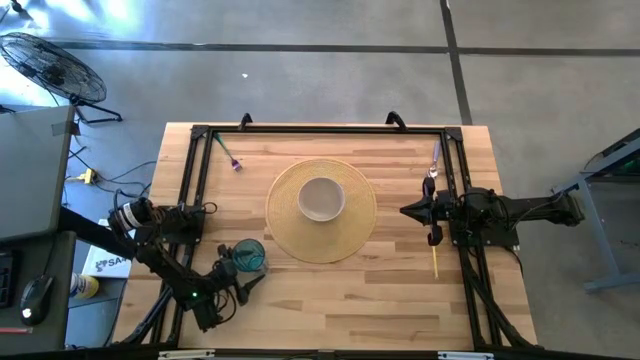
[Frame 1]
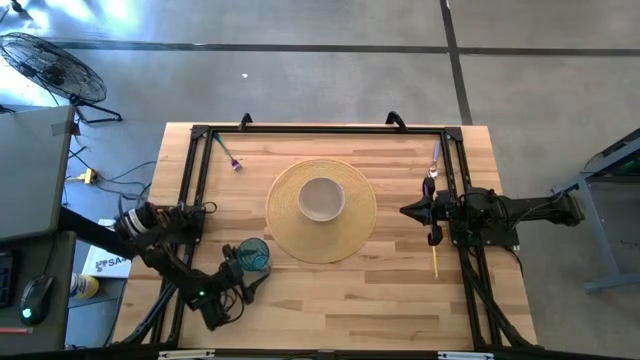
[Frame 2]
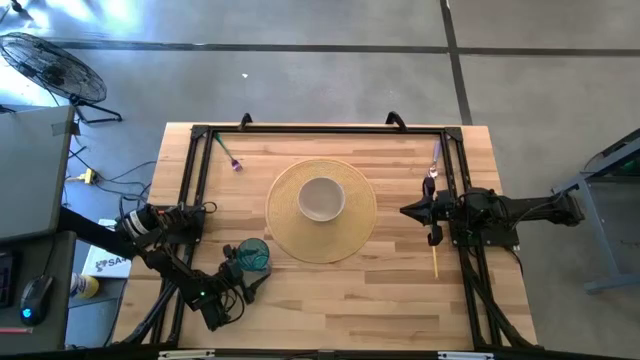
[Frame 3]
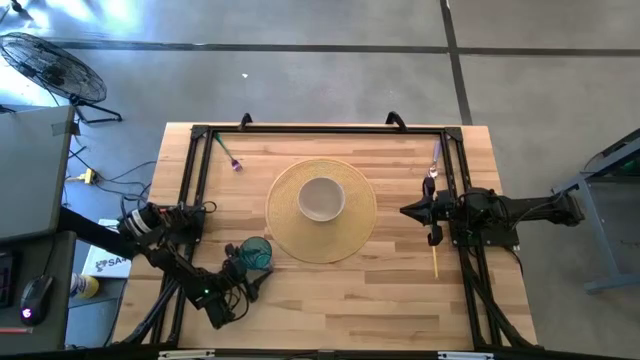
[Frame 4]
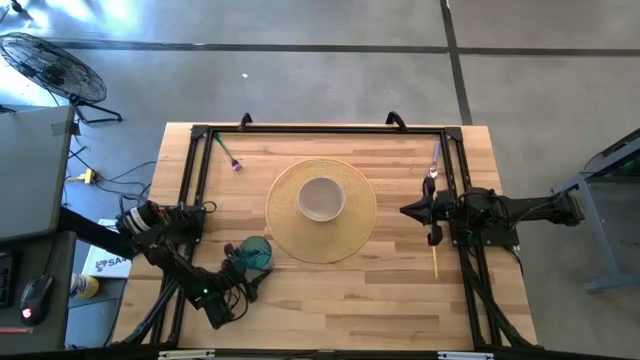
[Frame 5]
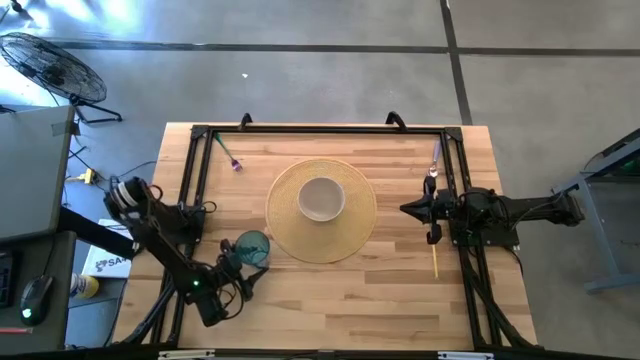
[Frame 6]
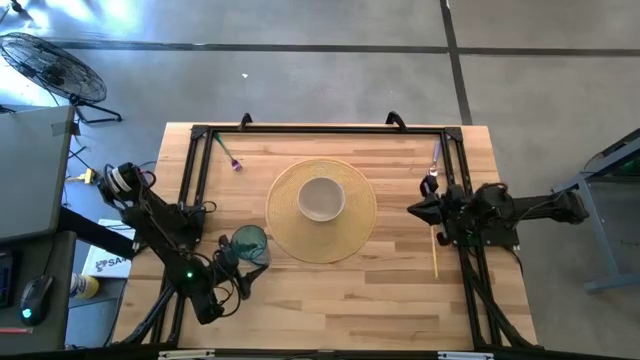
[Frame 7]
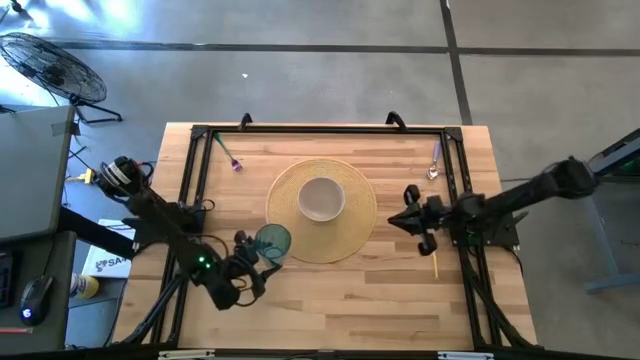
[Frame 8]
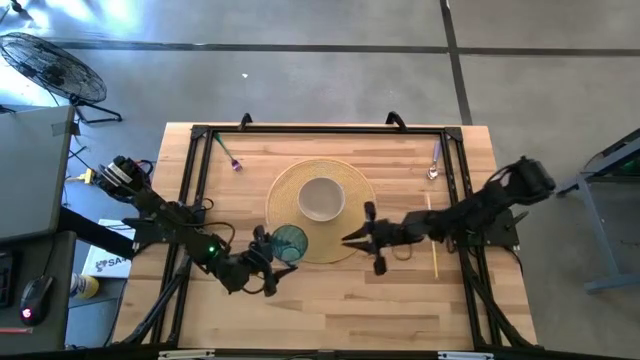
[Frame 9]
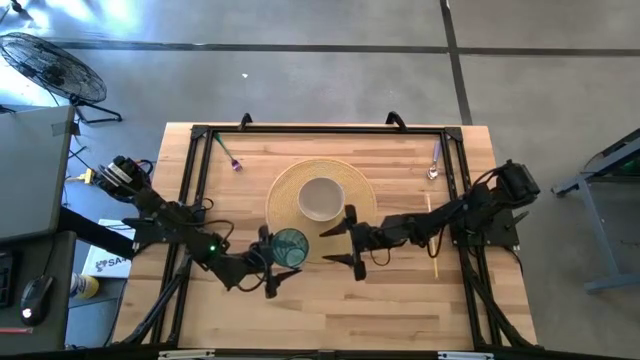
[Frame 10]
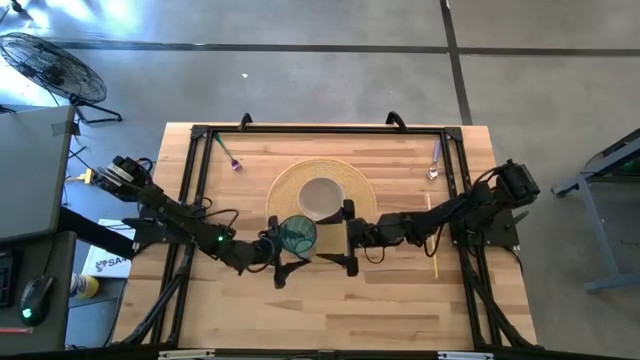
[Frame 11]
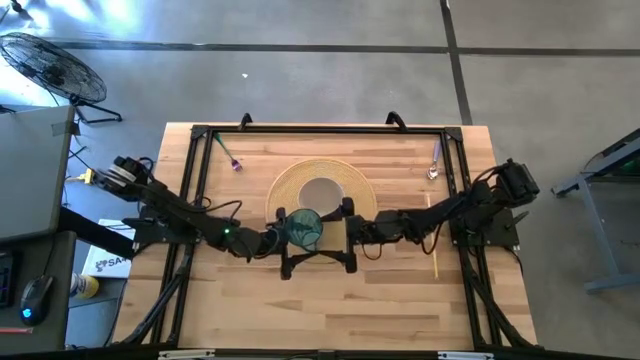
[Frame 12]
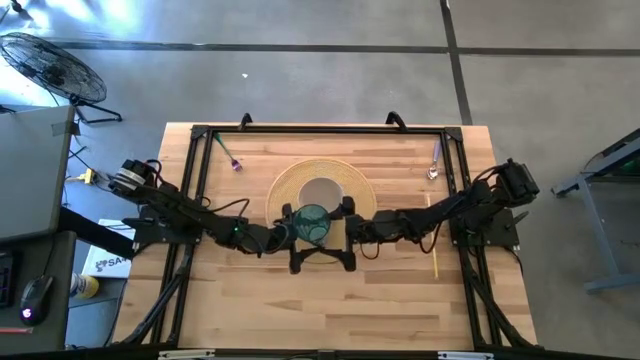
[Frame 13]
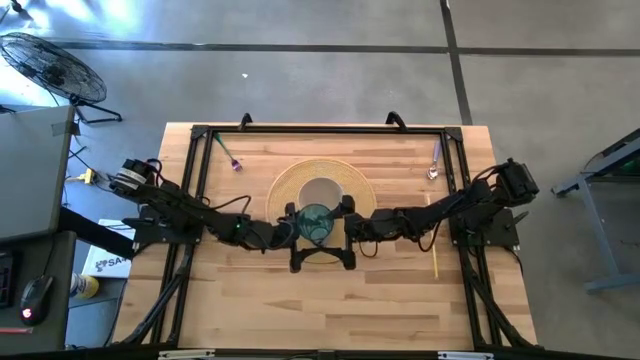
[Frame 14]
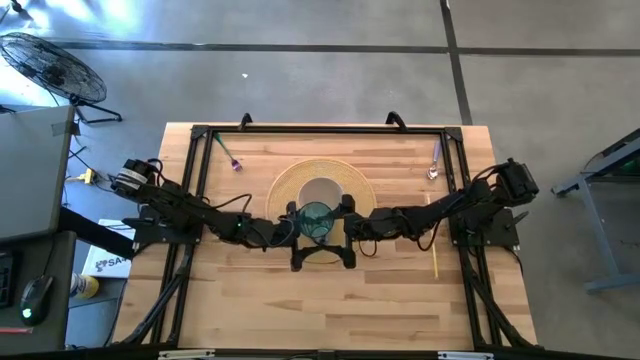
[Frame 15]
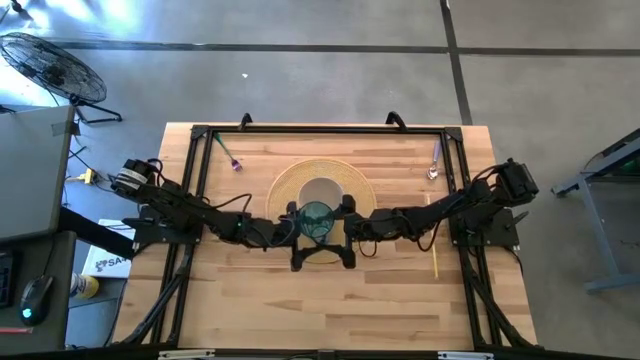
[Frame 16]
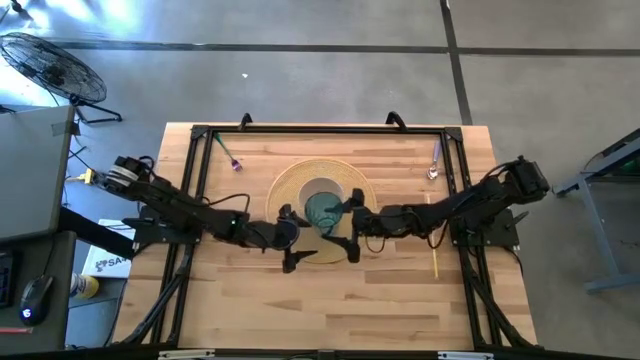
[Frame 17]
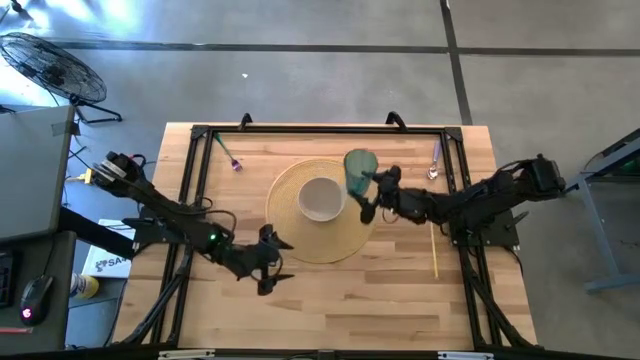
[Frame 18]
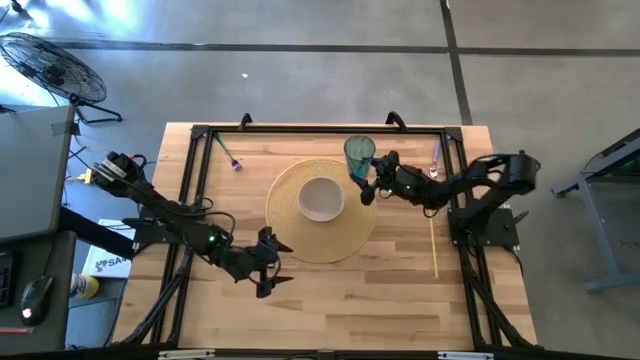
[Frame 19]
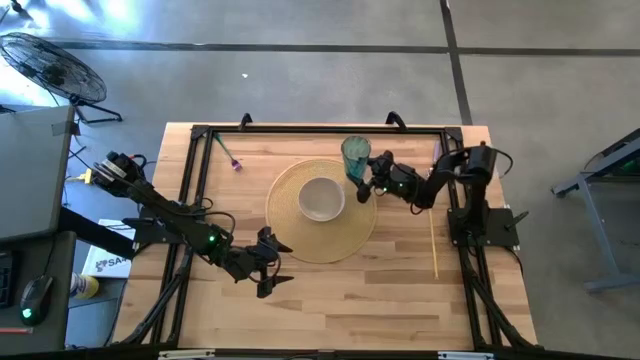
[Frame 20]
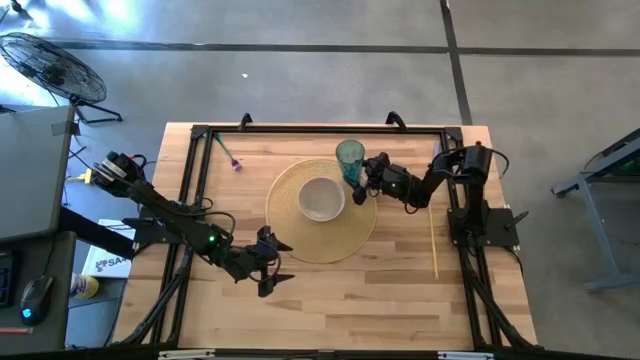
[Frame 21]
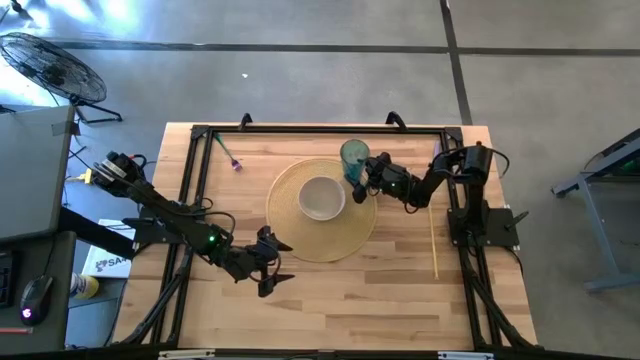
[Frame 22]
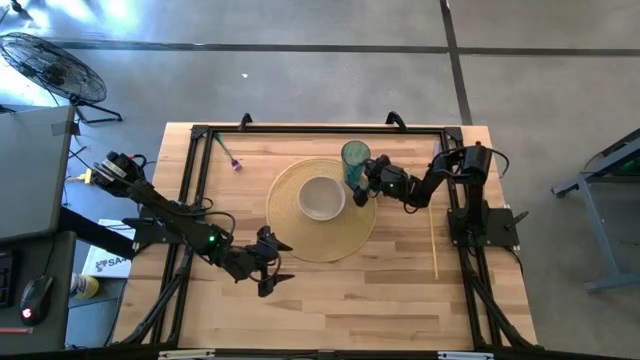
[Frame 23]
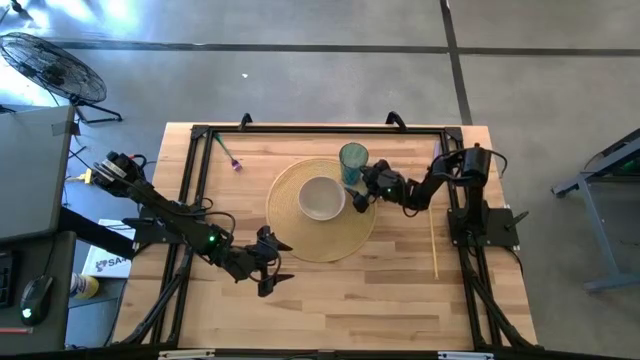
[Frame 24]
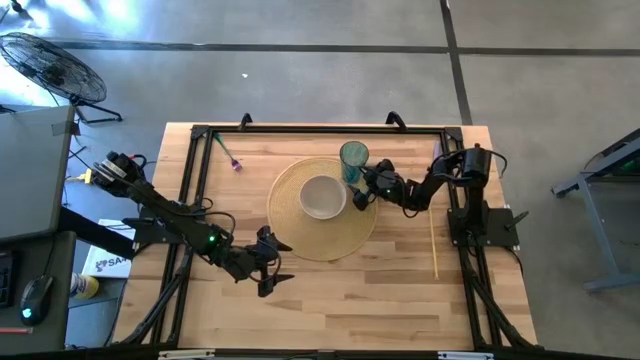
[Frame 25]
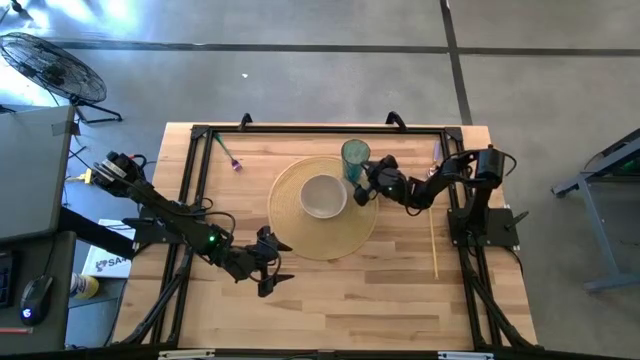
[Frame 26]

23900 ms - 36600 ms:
Task: Pick & Place Utensil
Put the blue cup on the brown placemat to the top right of the white bowl

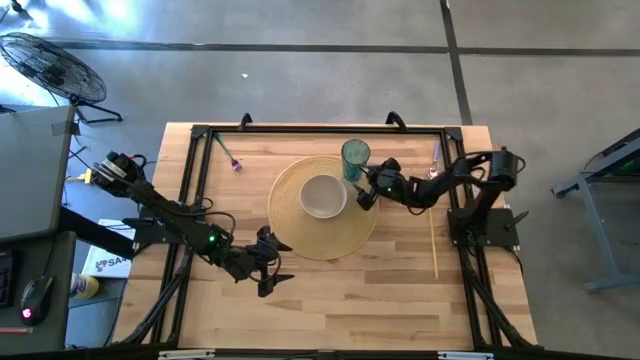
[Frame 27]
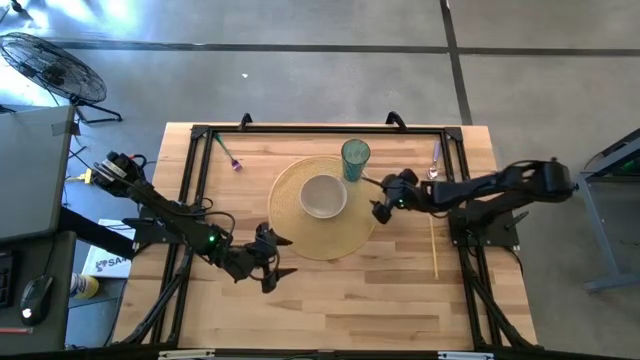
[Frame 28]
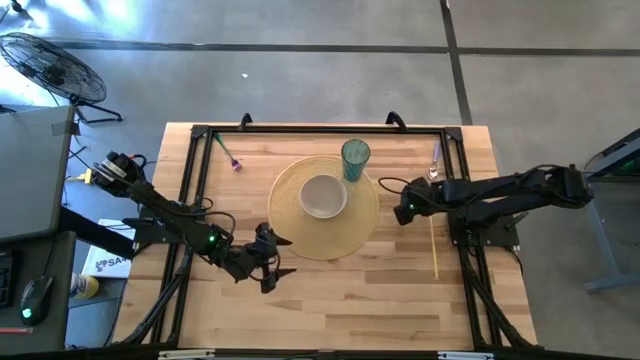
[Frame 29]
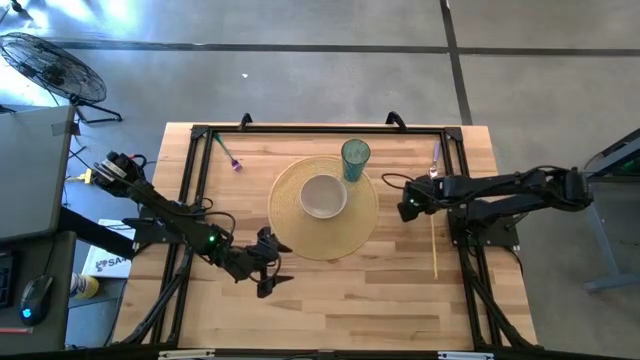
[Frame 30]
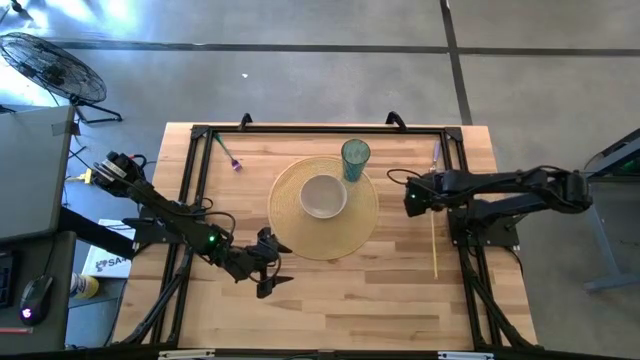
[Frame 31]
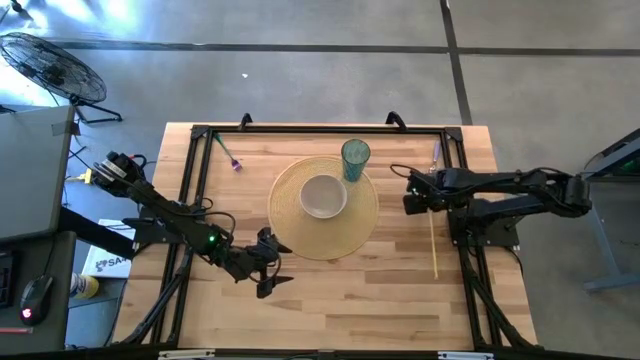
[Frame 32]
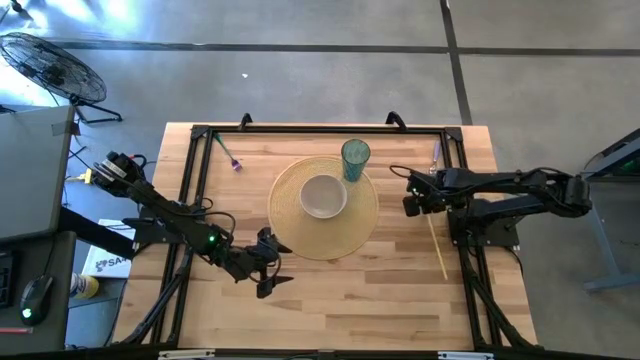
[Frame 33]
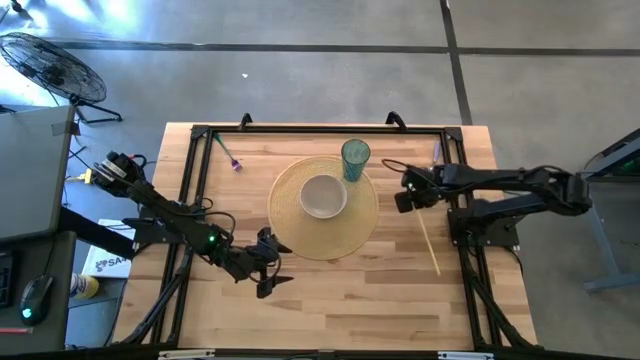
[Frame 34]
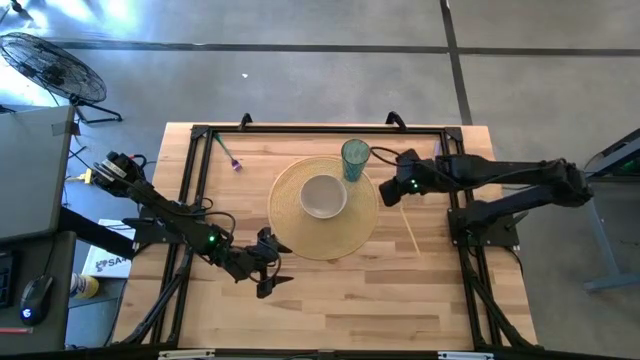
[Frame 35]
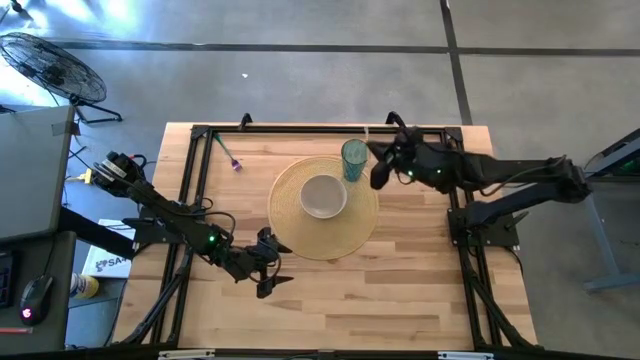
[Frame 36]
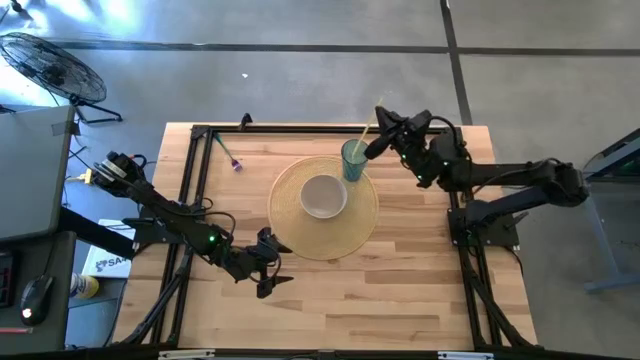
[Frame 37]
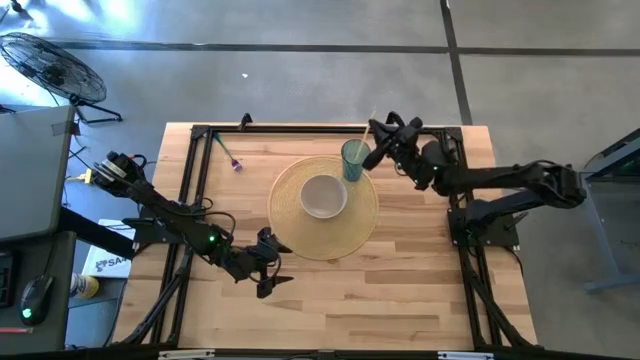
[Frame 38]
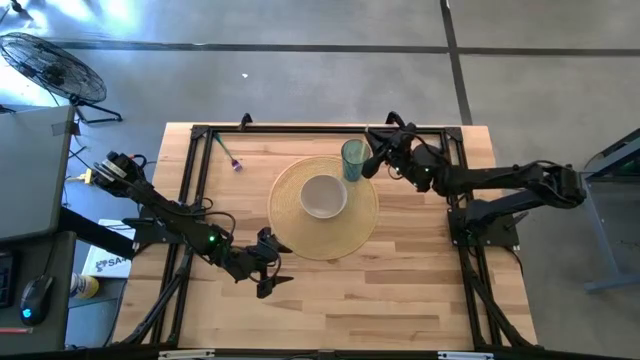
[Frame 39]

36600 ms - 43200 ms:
Put the yellow straw into the blue cup

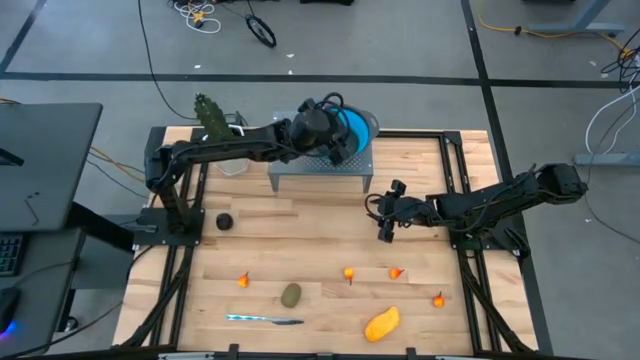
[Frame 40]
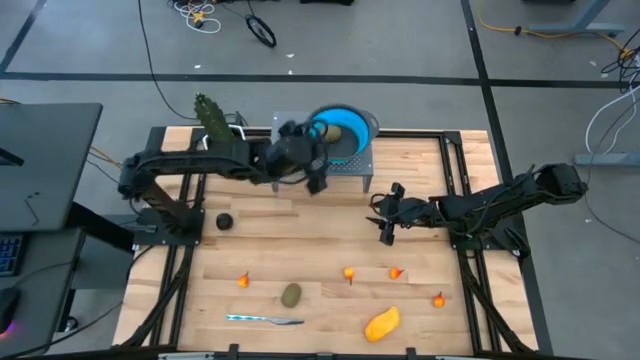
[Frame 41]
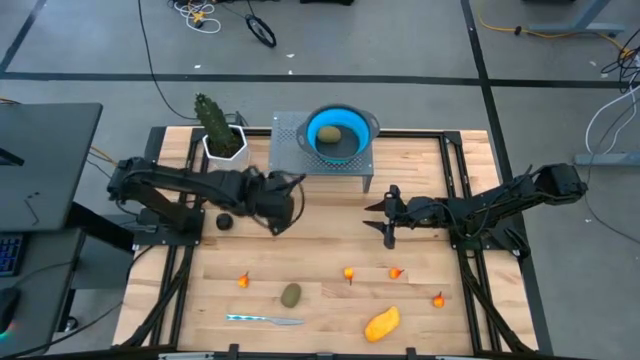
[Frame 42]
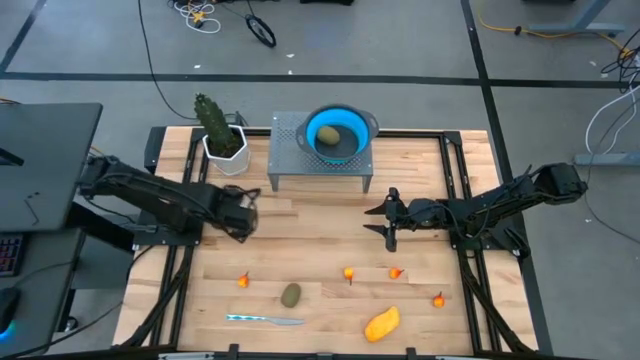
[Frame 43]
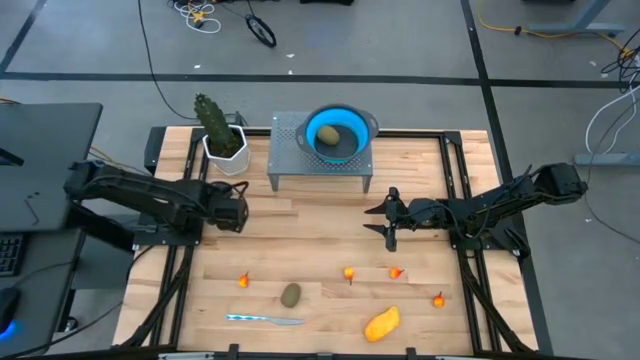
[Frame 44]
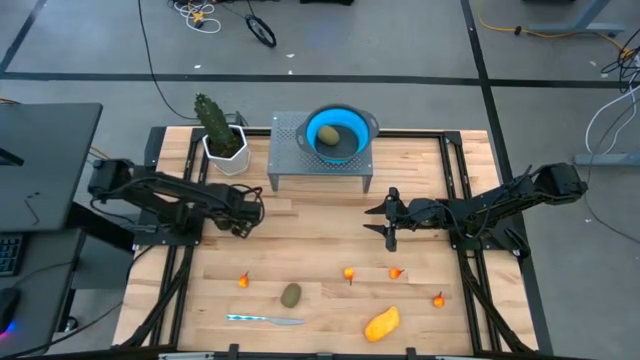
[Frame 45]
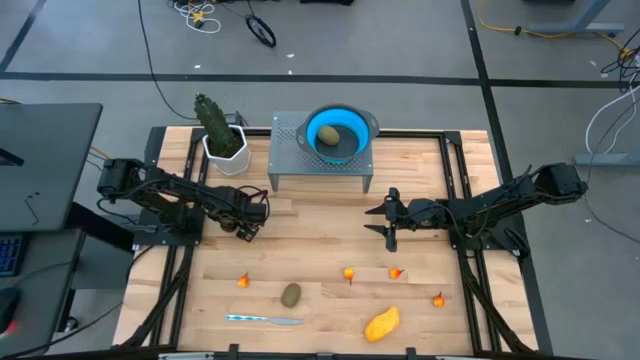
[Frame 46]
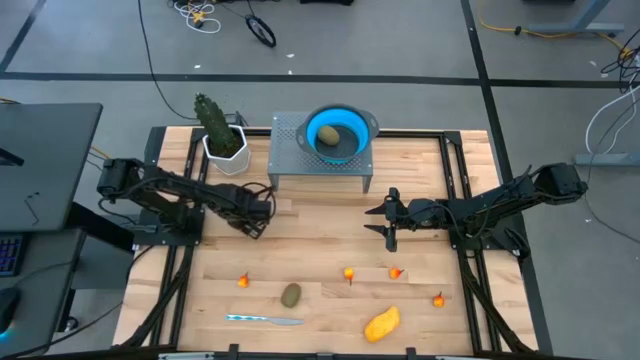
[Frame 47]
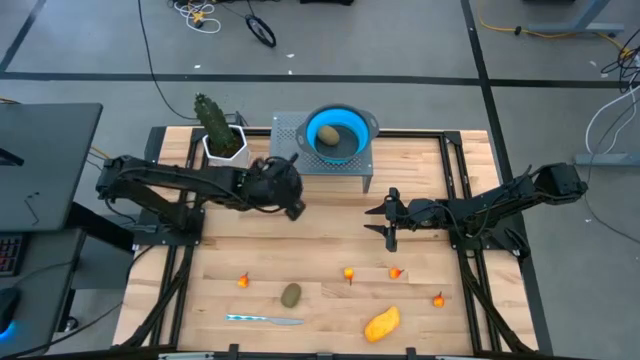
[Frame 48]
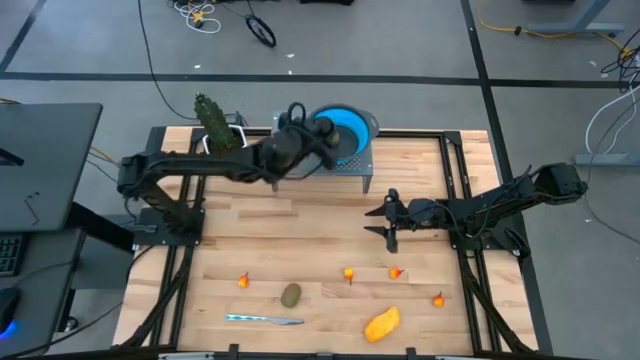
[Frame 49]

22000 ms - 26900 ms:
Task: Pick & Place Fruit
Put the purple plum in the blue strainer bowl on the shelf
